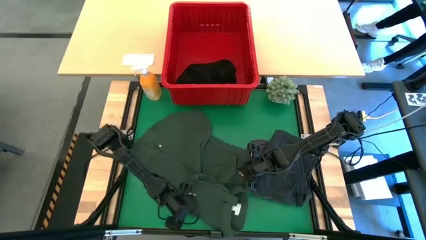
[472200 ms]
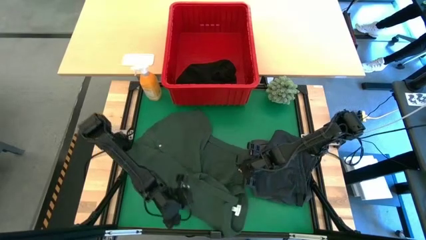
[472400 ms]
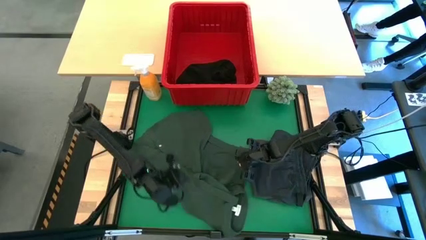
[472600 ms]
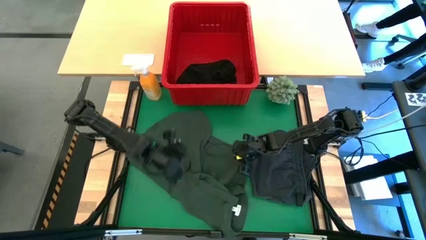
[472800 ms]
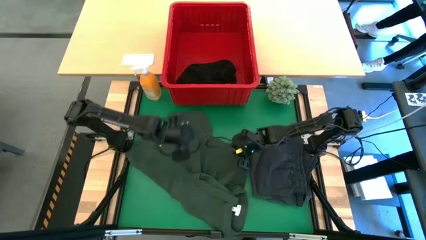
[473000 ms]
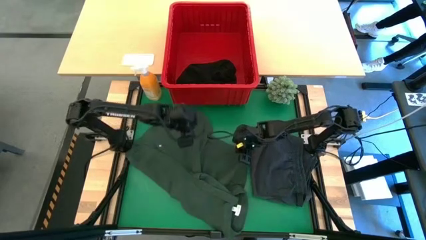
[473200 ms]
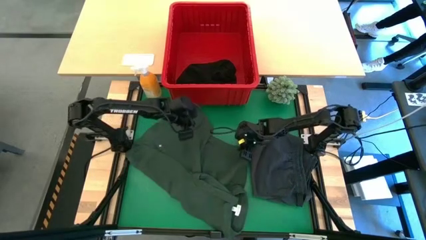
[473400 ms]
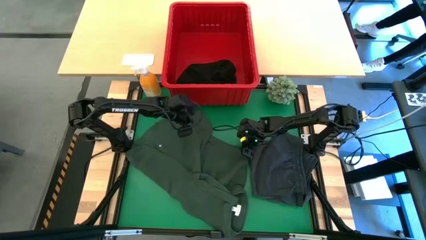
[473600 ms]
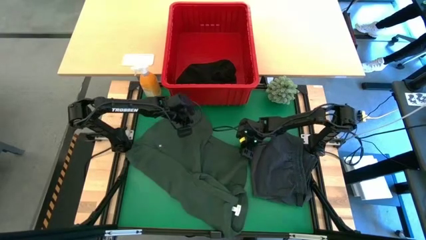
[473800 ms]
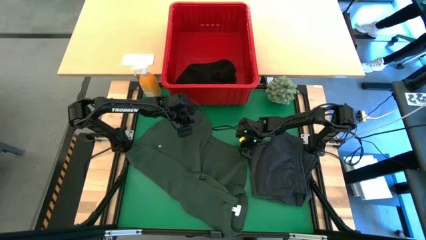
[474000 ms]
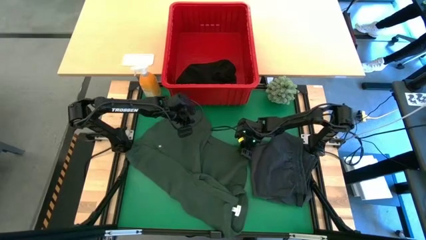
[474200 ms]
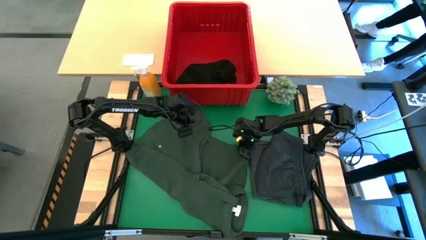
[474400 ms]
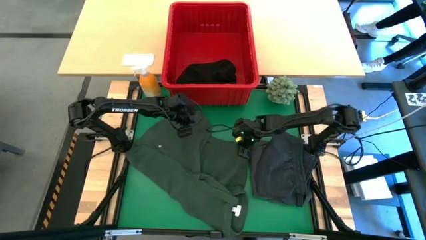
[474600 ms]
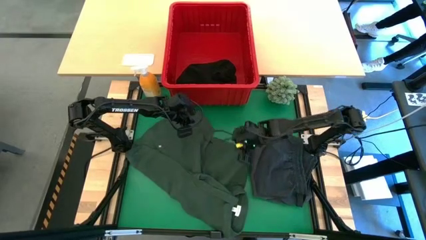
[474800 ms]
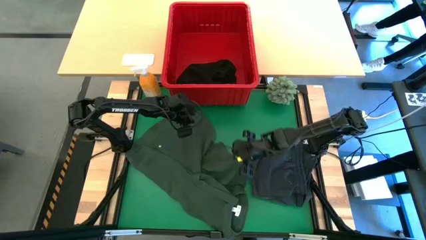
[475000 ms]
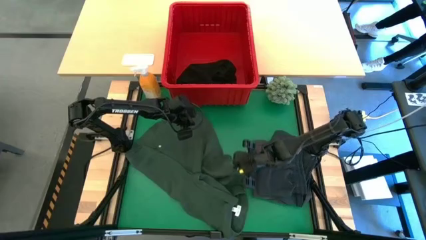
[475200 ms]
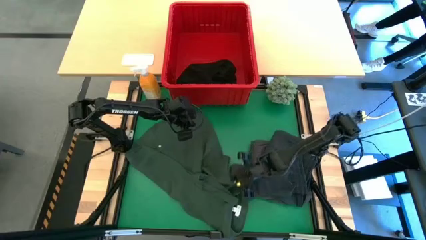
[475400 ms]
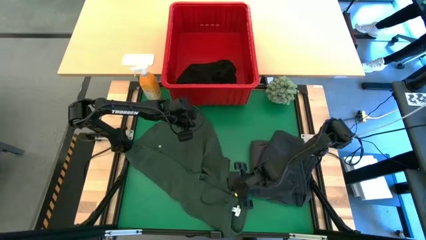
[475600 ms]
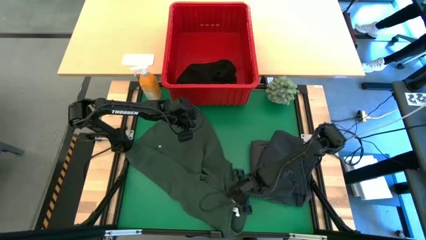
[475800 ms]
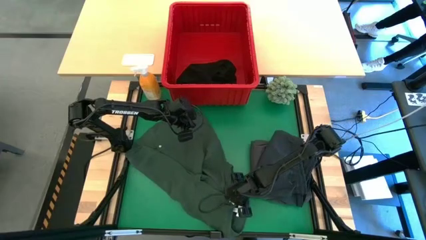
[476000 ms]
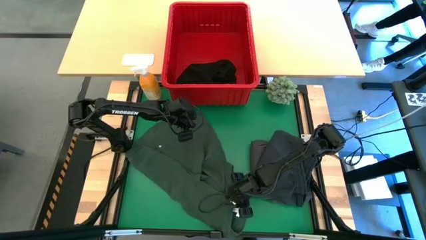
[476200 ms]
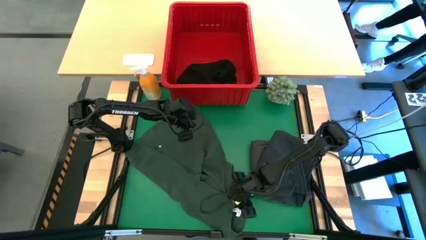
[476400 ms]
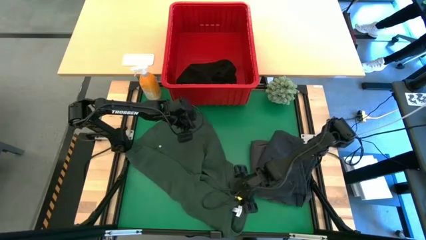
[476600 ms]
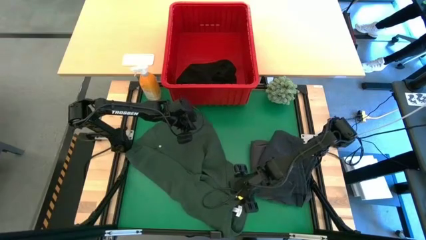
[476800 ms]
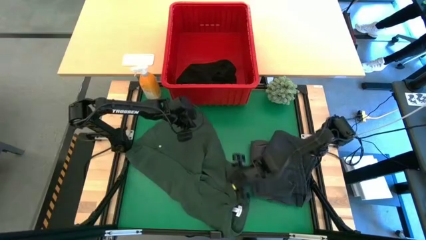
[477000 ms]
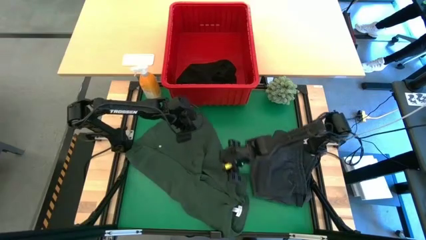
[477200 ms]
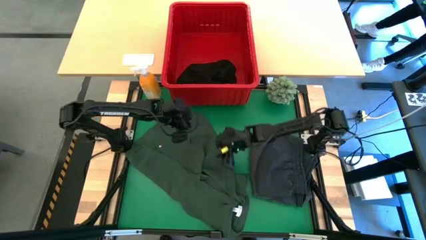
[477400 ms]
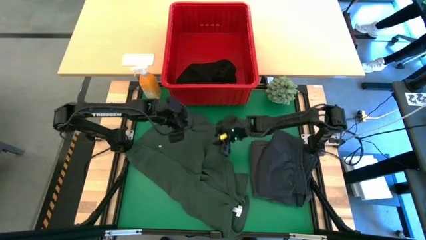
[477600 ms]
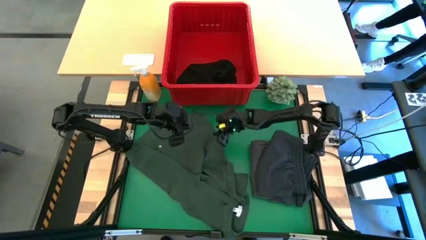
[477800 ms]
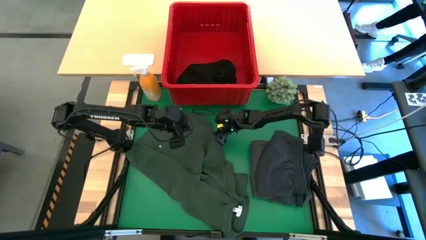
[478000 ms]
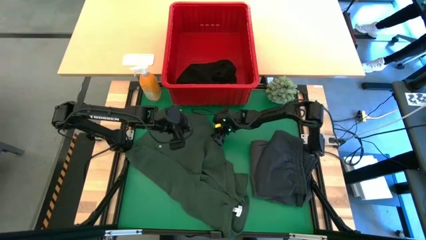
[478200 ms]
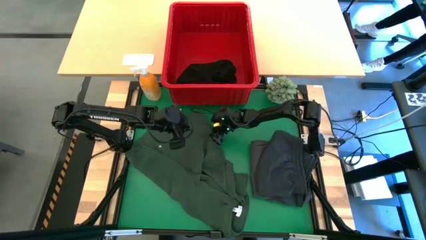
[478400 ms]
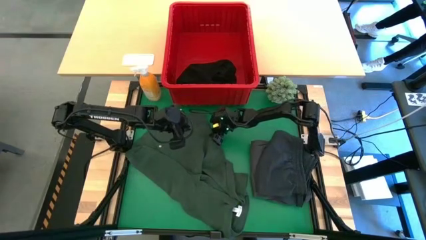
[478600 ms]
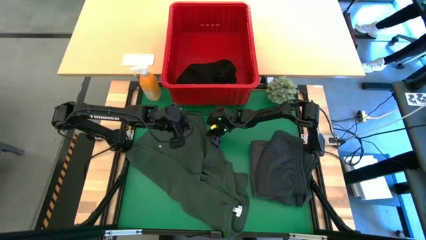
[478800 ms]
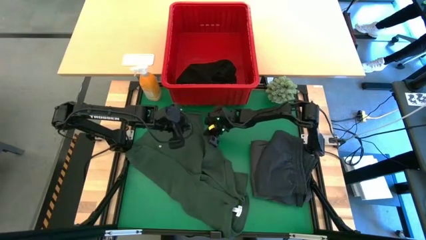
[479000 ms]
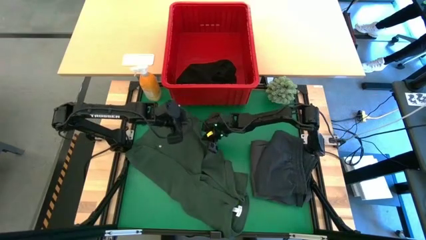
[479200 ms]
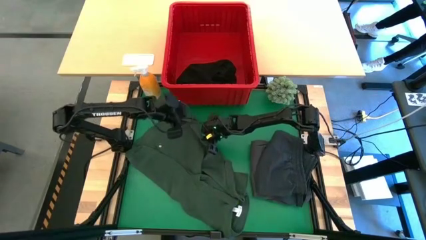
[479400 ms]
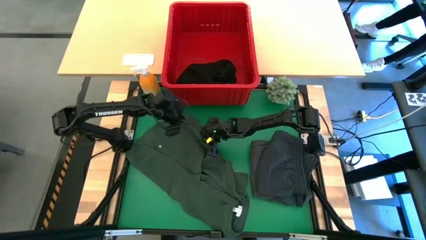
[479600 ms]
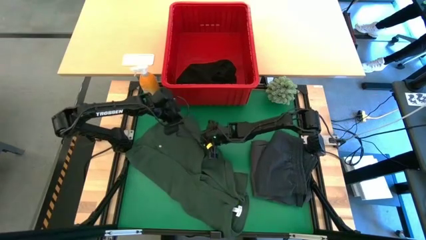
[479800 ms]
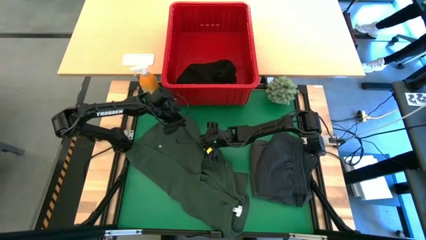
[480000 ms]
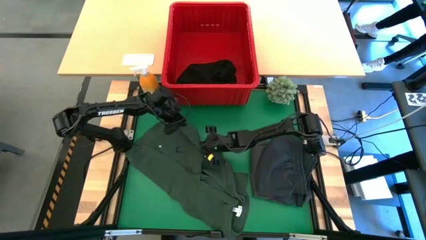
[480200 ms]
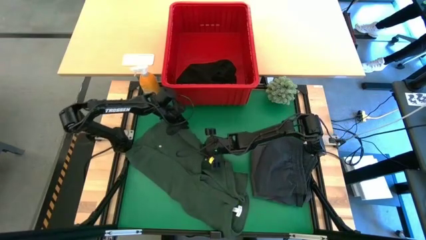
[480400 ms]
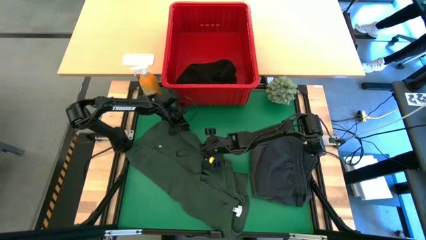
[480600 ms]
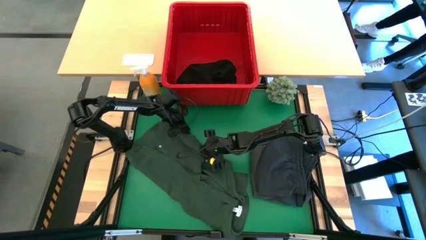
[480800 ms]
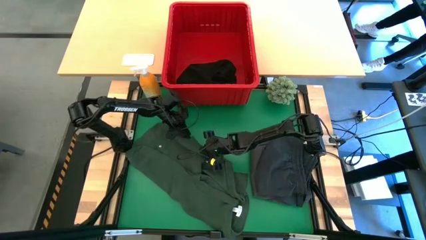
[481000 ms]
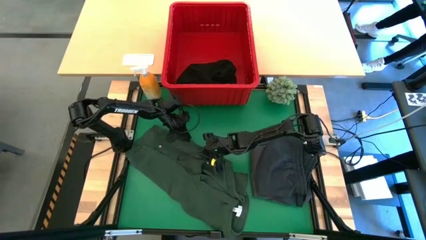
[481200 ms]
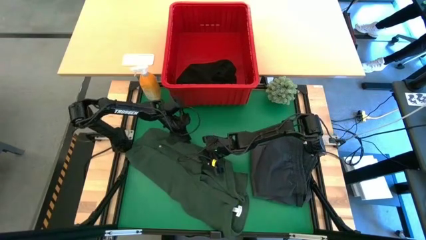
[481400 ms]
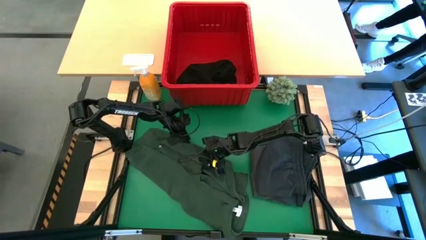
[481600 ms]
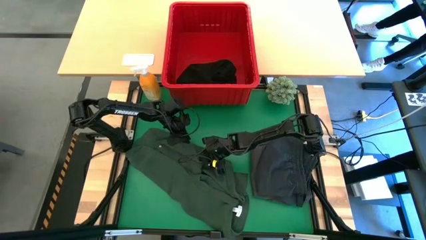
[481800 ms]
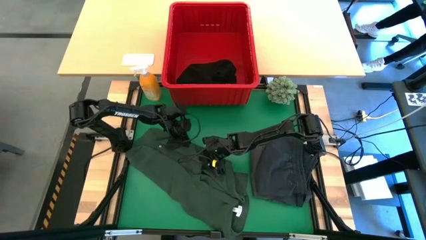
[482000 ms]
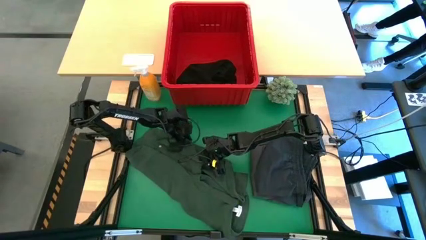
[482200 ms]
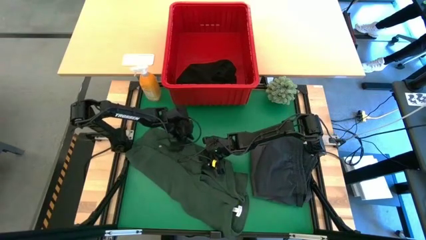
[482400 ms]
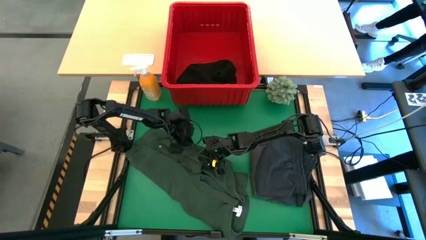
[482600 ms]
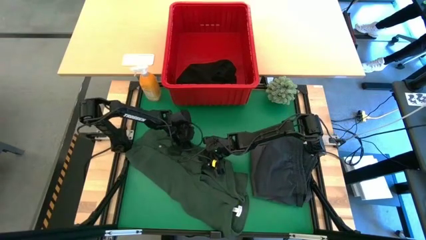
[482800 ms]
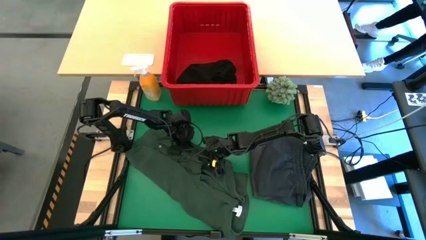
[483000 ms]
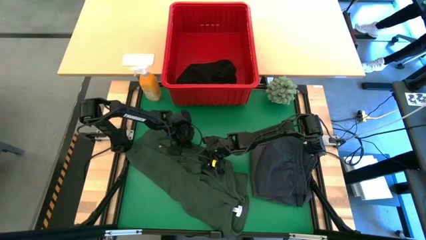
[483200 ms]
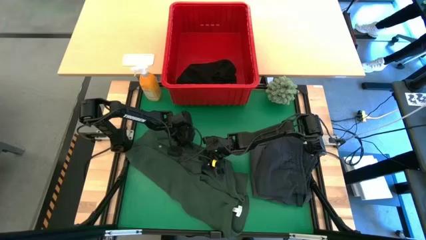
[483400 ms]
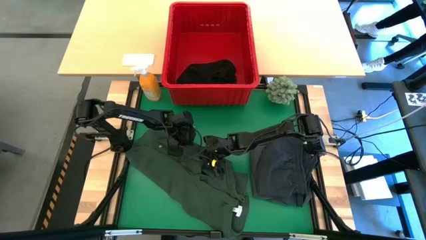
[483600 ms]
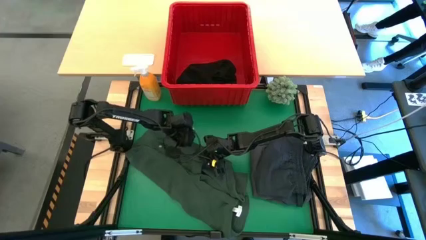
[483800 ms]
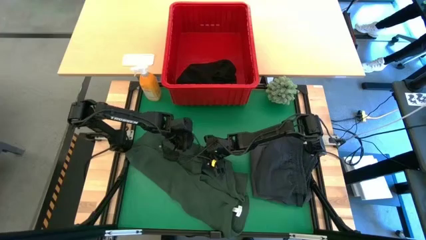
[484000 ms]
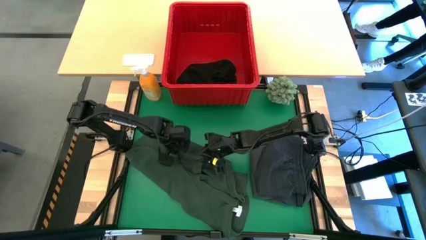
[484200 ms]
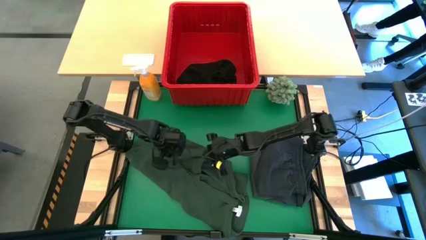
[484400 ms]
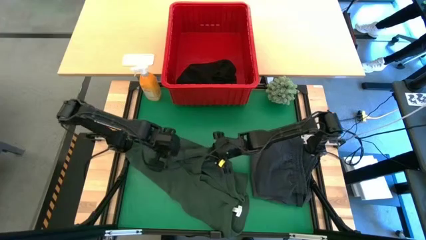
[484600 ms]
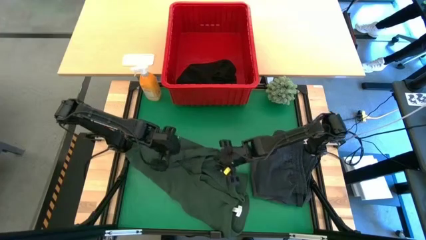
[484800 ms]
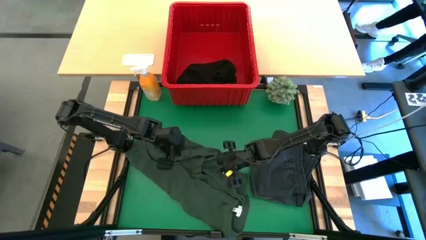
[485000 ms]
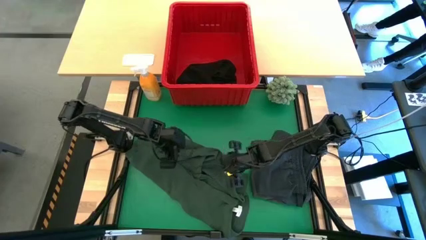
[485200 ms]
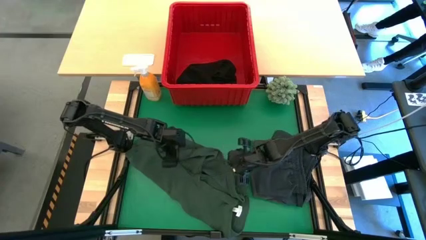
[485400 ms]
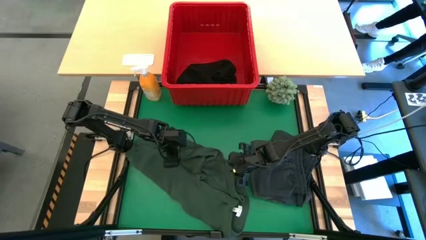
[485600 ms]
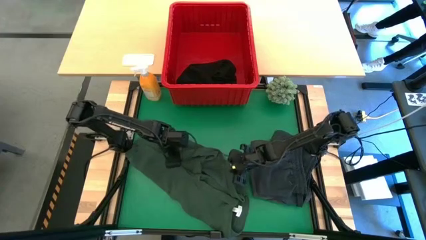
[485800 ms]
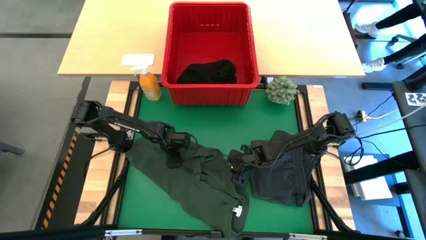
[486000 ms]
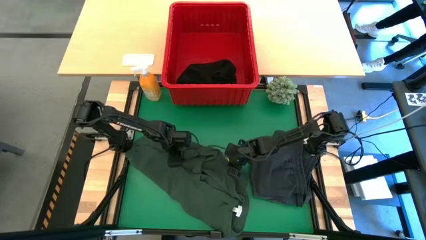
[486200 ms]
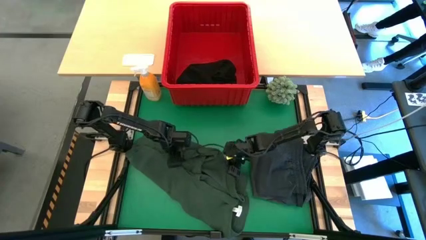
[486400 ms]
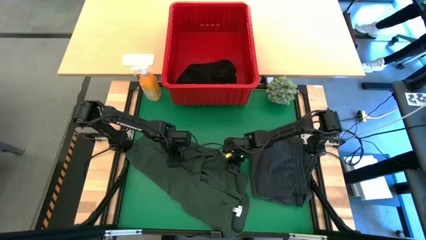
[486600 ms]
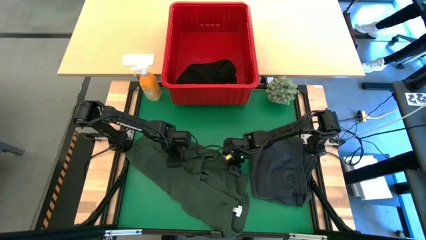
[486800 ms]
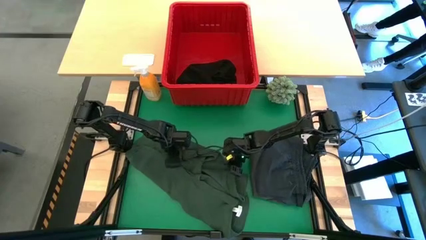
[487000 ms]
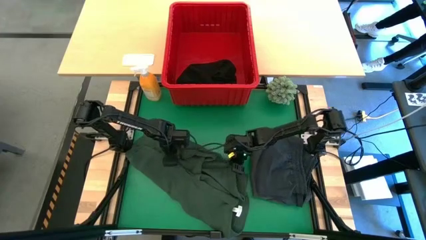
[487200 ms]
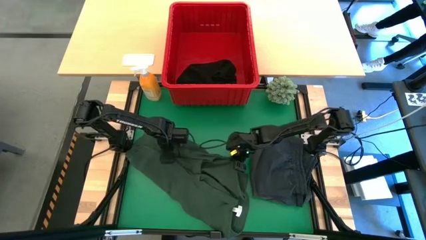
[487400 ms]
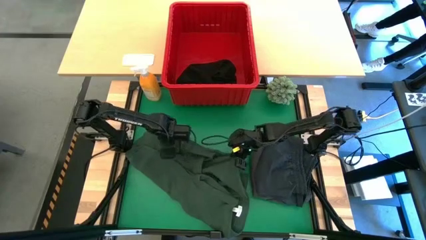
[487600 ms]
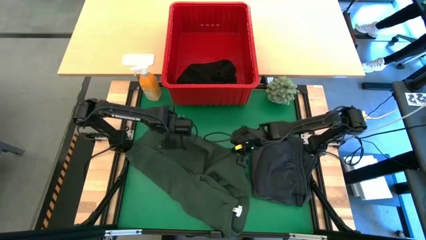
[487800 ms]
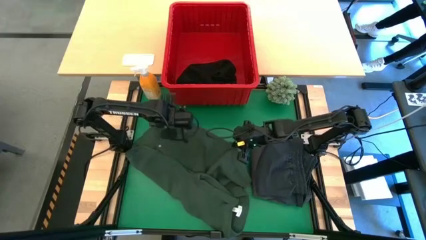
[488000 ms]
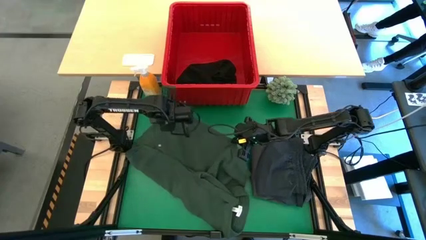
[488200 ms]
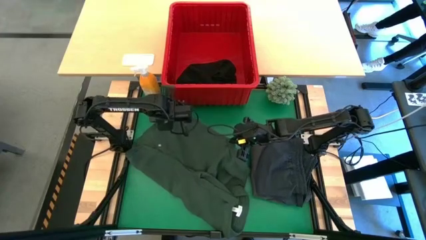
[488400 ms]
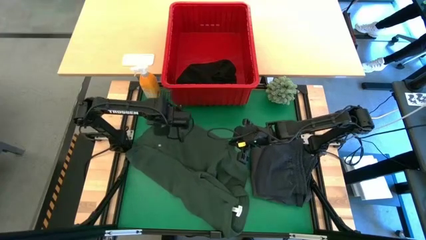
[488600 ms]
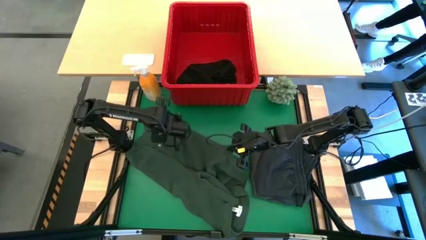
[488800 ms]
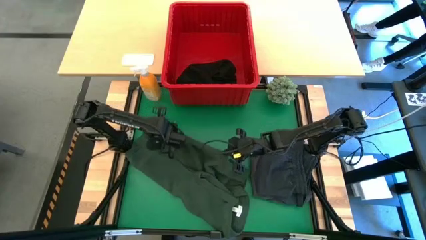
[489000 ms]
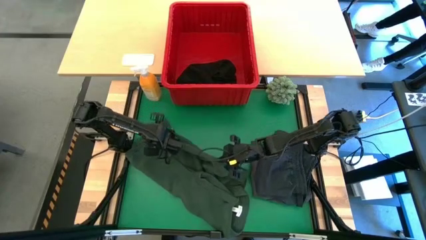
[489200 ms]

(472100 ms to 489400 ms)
Task: Fold Laundry from Bin
Fold the green polo
